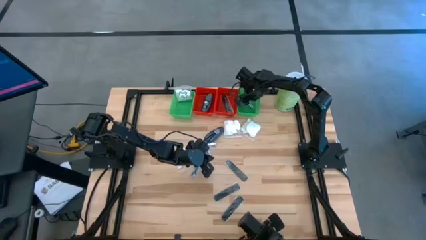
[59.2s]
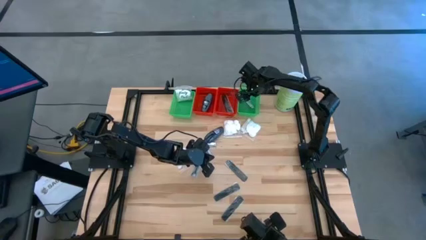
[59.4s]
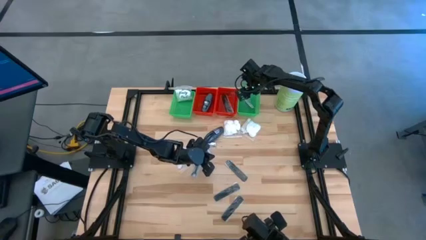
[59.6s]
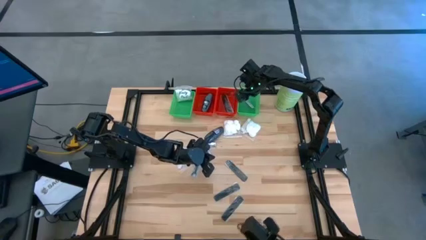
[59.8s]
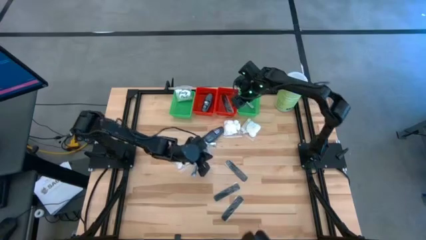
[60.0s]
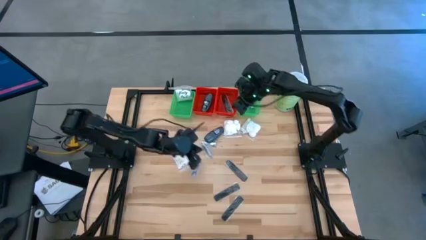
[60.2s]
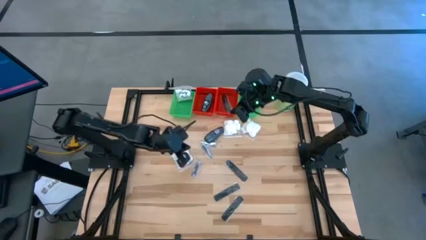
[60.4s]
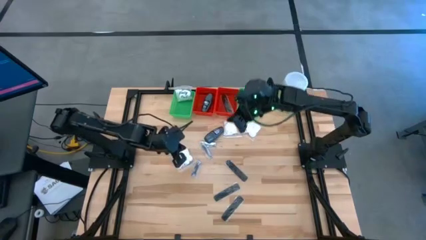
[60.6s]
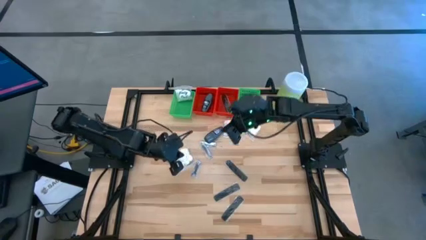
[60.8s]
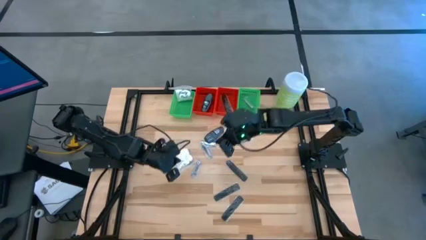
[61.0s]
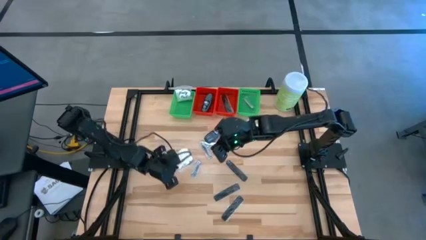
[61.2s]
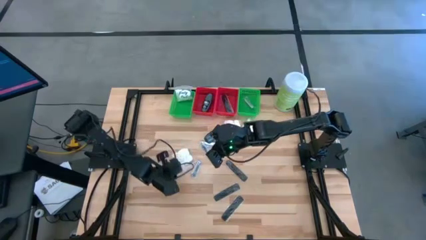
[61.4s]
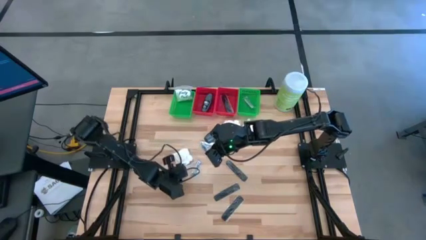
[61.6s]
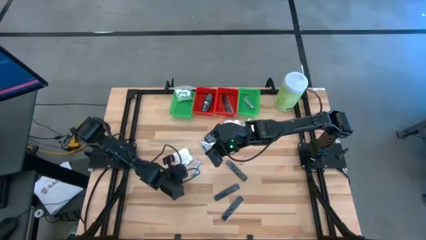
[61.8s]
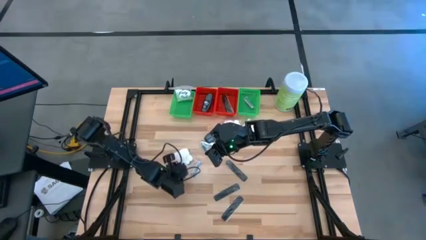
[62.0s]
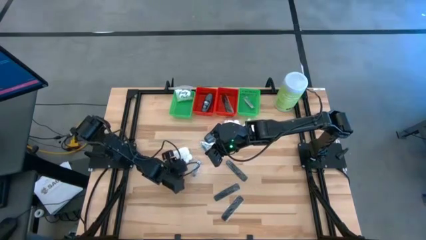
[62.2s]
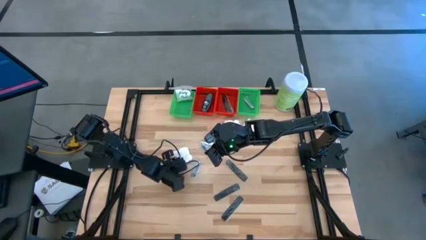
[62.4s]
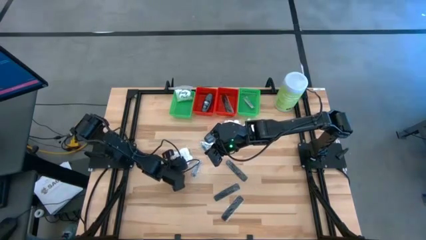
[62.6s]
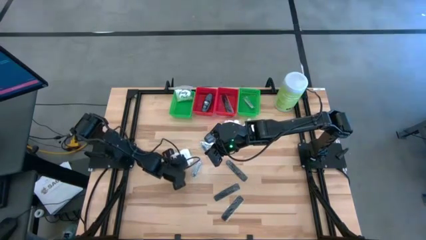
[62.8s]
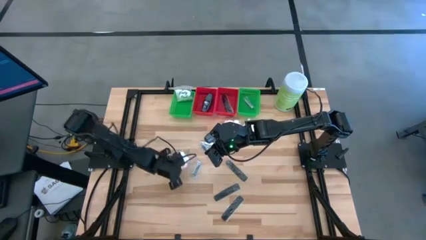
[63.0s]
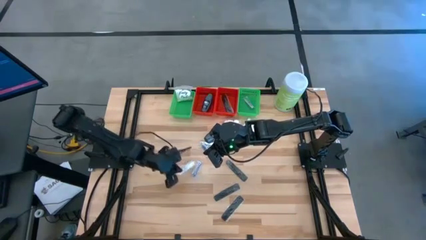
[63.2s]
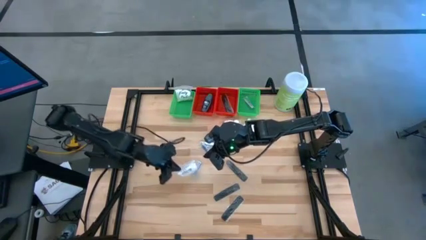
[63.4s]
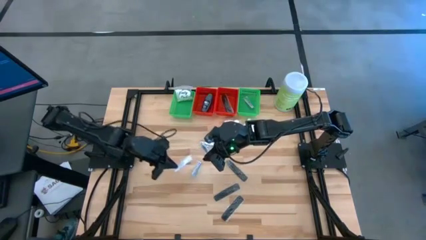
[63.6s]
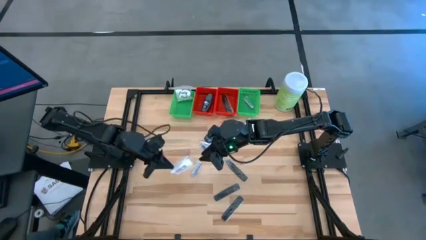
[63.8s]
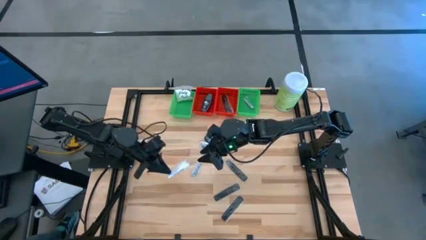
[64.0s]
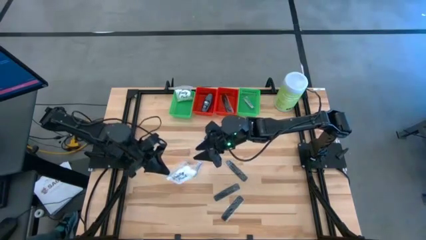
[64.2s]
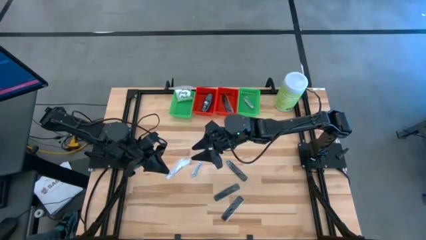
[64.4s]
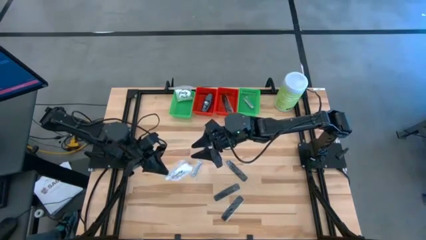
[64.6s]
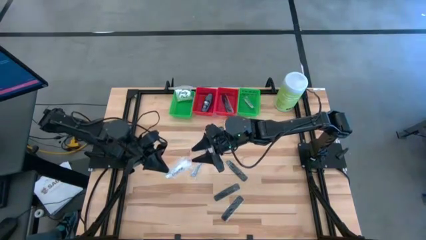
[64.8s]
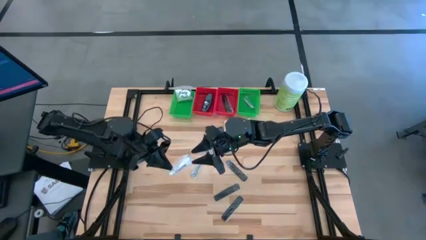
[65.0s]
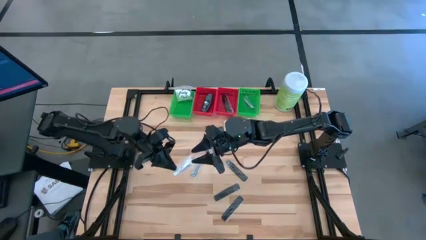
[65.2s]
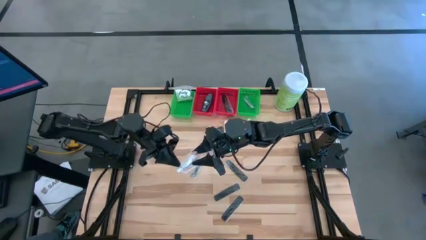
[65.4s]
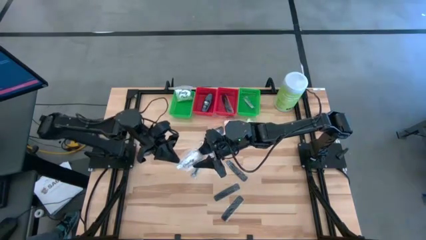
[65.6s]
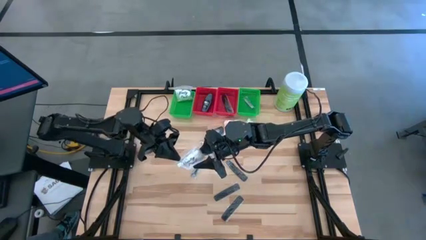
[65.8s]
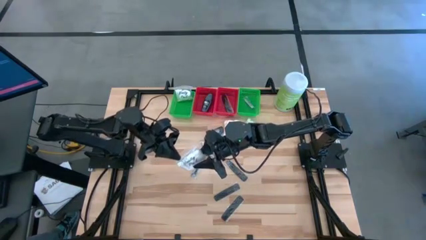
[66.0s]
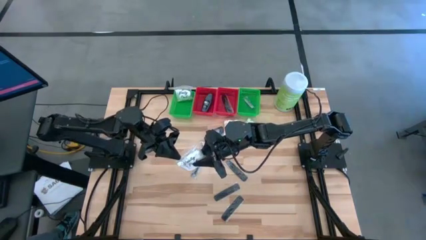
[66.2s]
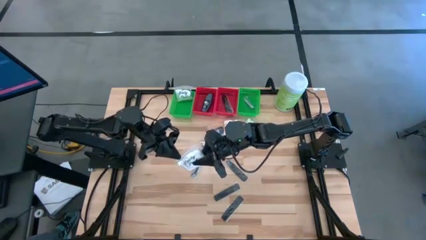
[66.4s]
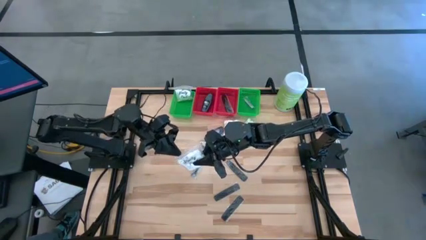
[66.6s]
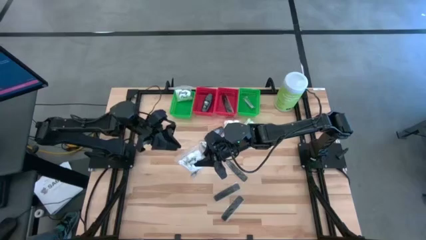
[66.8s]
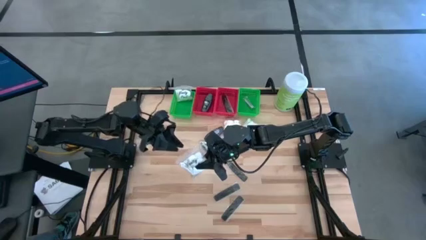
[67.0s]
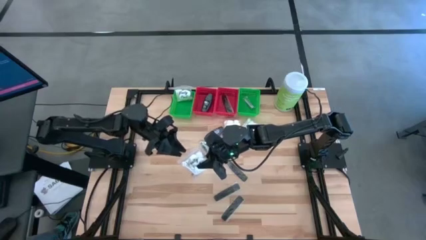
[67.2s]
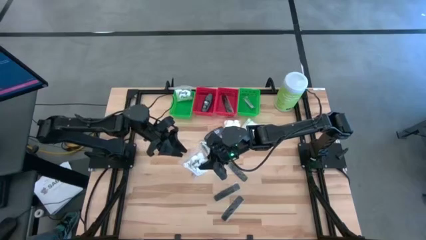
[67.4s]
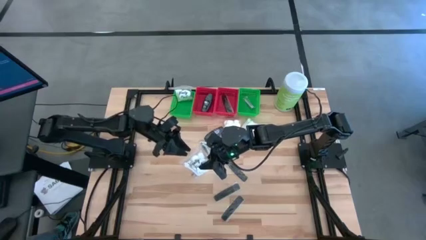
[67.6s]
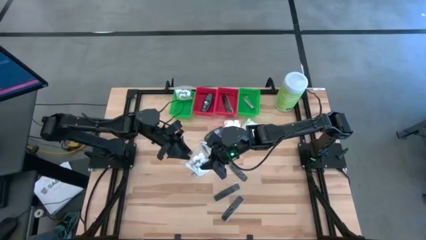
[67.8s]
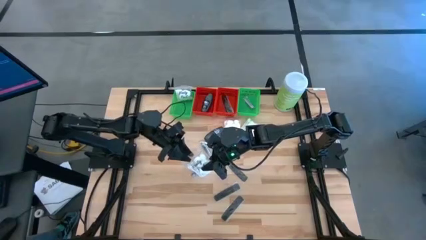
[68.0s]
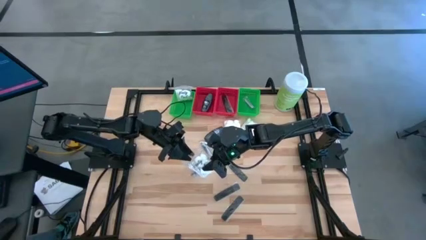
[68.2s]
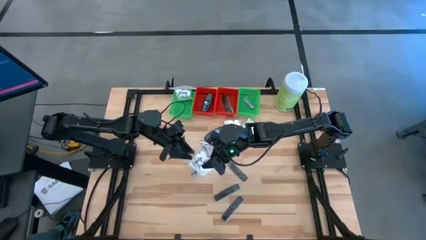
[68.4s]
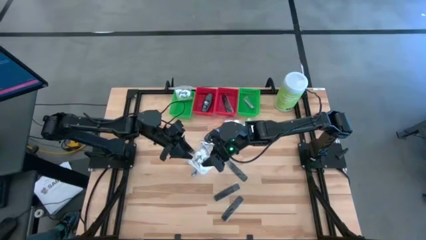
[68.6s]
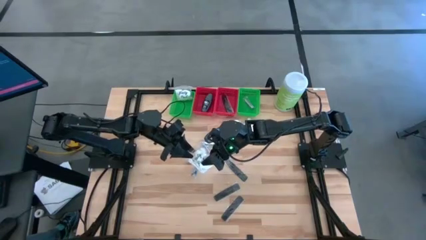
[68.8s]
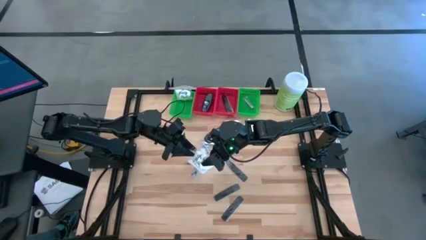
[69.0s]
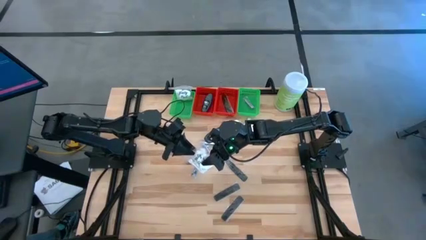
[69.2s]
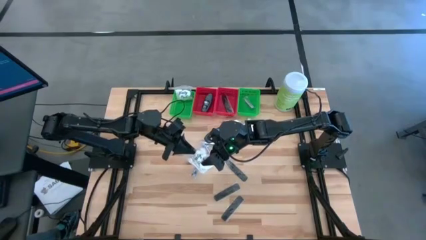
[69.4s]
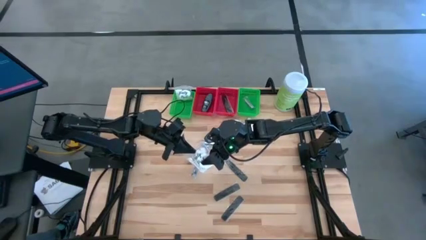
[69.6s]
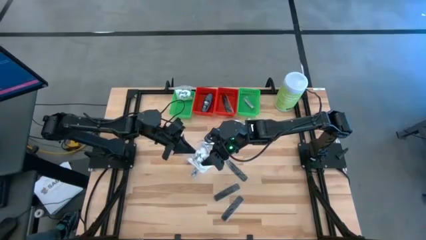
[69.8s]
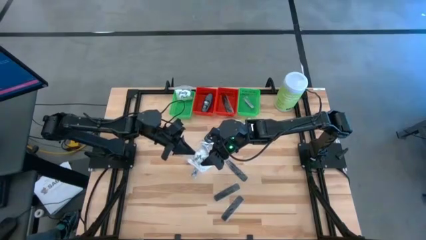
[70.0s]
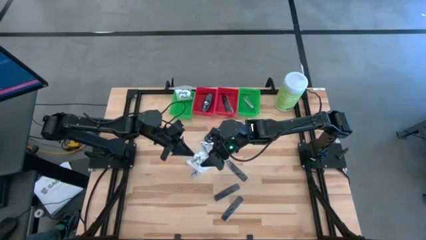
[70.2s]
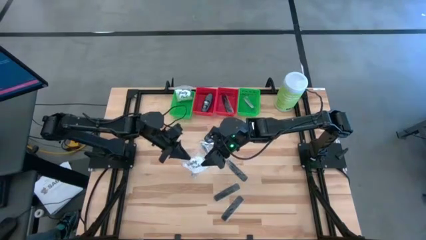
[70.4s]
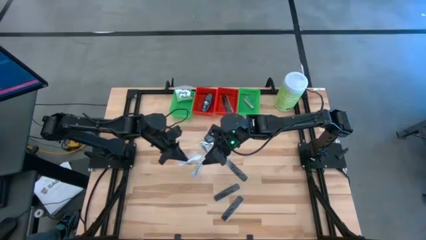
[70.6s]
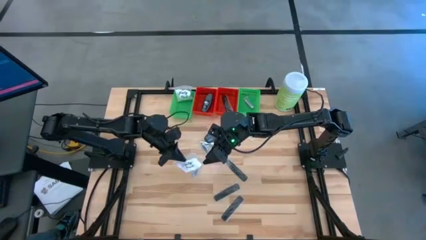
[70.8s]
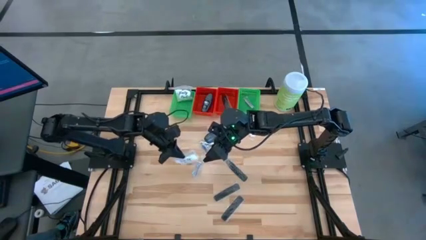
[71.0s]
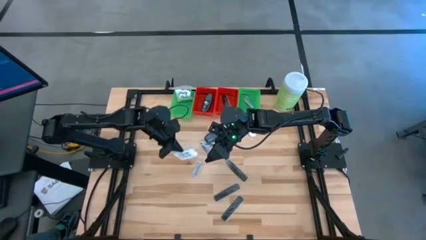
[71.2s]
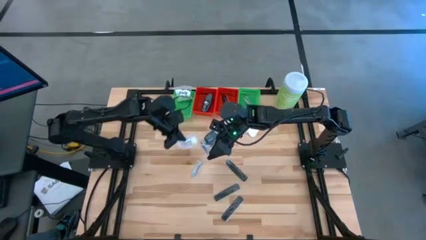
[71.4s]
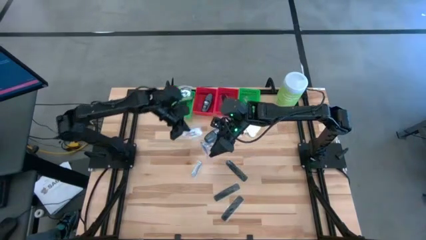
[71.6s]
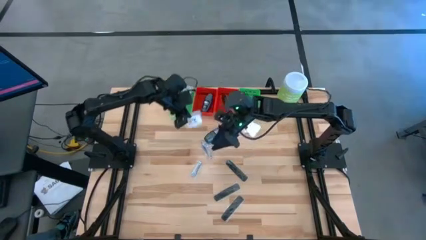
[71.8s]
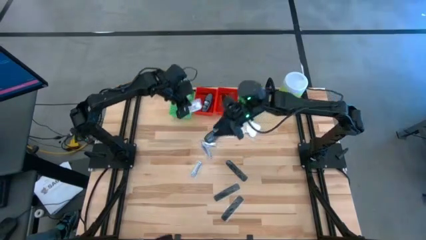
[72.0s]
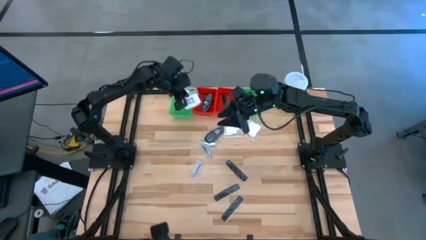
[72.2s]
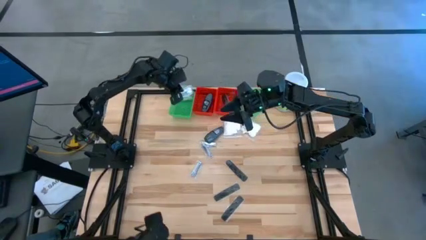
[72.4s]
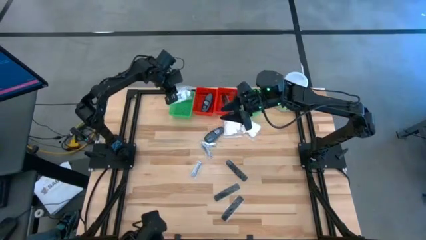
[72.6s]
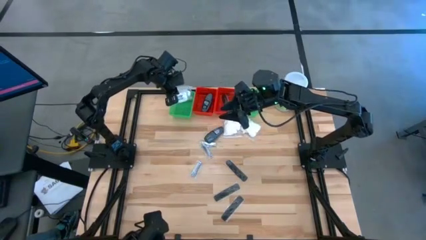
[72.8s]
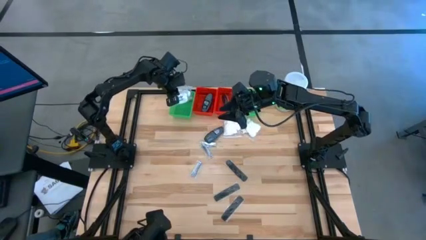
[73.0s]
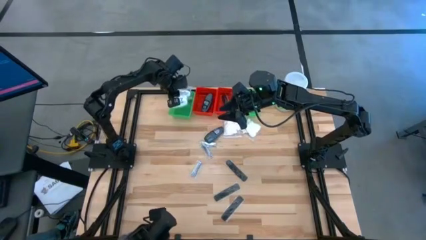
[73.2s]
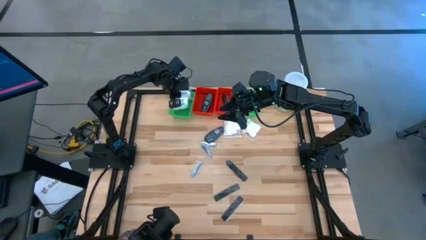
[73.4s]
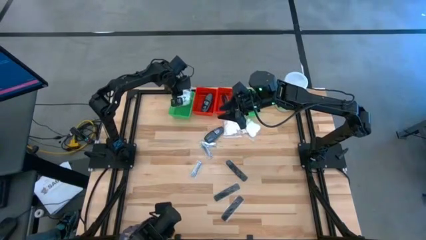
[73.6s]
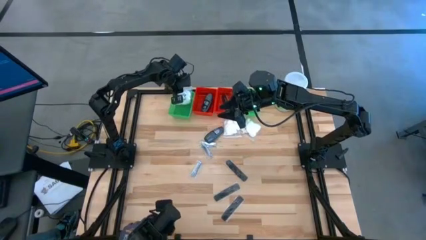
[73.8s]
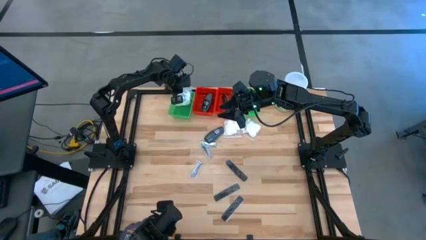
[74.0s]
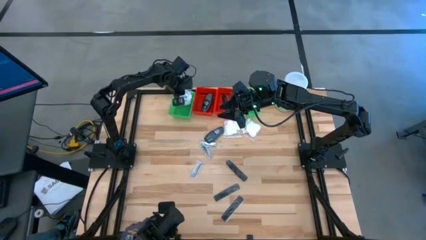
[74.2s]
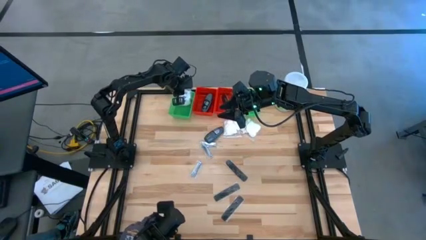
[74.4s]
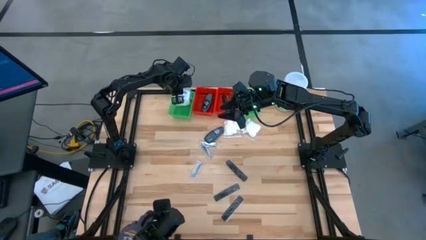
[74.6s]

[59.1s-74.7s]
Task: Pick & Place Travel size toiletries
Put the cotton pack into the left green basket

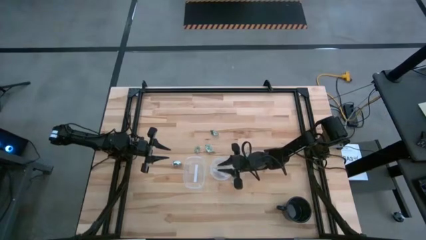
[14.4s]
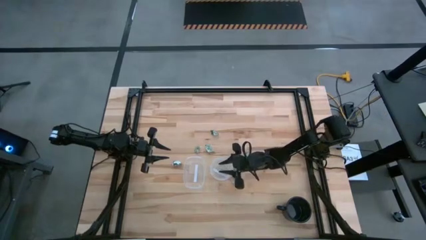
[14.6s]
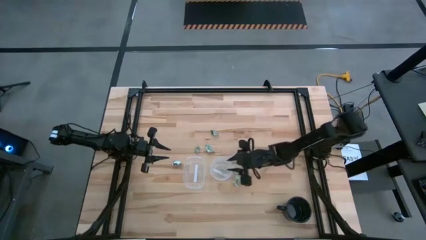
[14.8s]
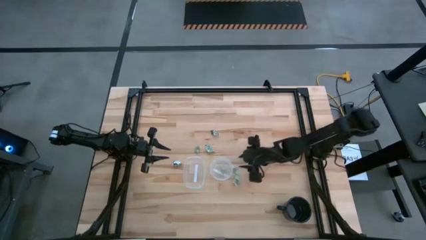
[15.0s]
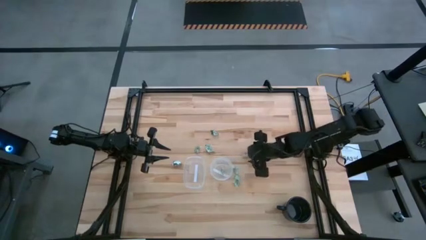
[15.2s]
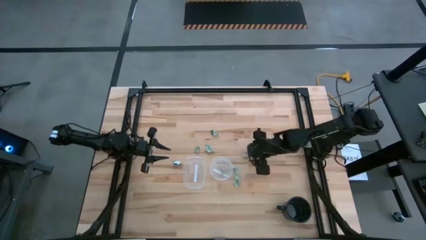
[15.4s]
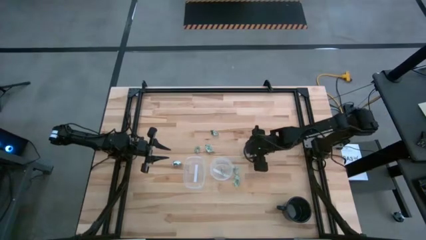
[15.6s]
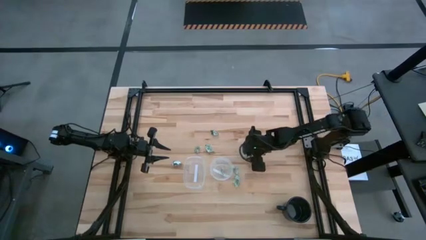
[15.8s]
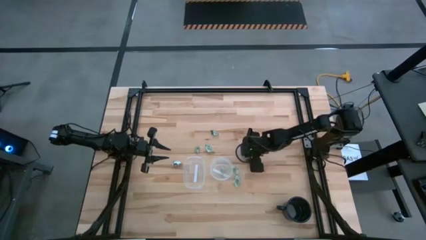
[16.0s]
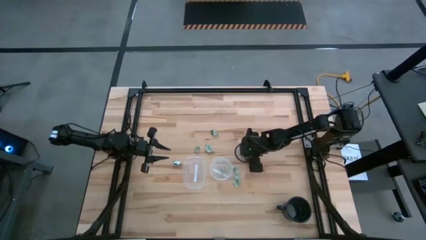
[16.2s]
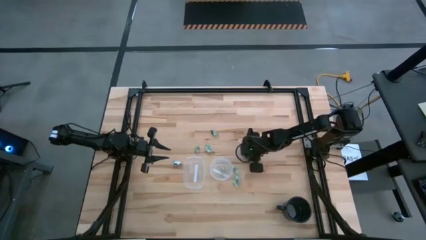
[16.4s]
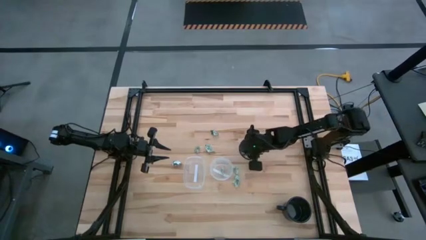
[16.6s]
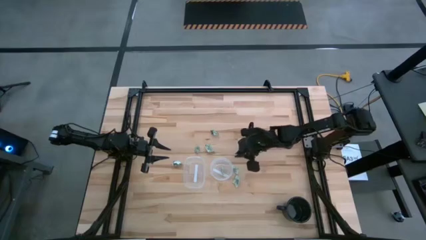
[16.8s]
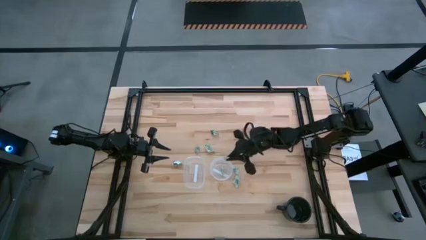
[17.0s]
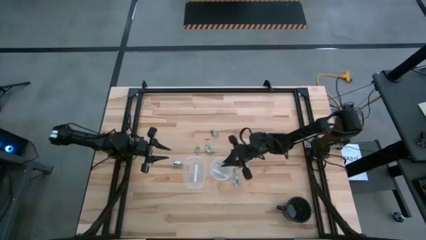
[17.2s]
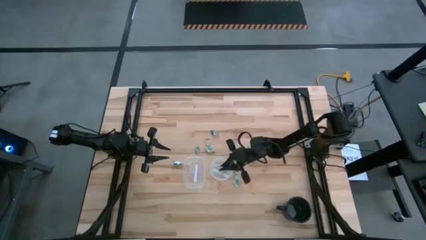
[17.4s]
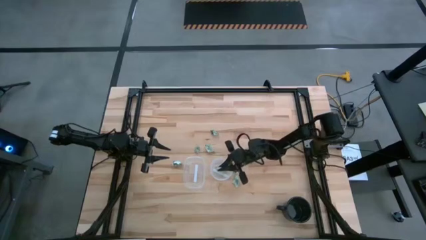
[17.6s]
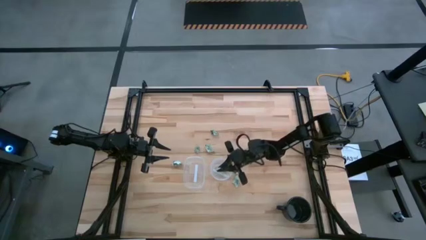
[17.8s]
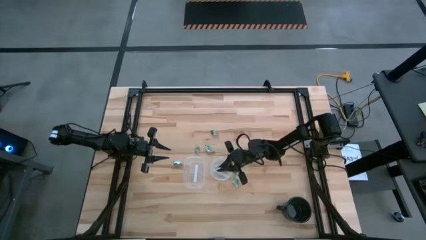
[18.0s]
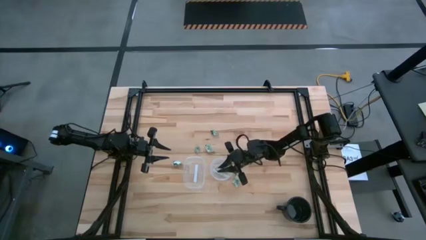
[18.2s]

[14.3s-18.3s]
Task: Pick and place items into bin
Put the stevia packet into the right transparent bin
